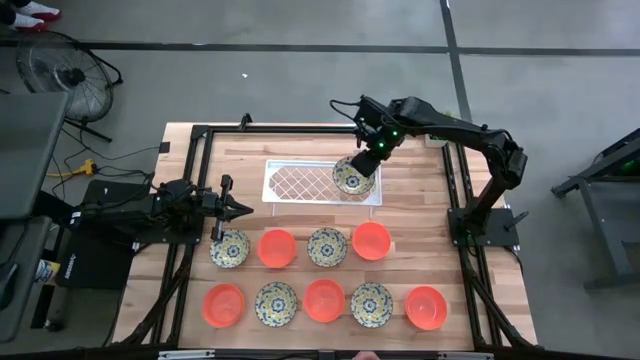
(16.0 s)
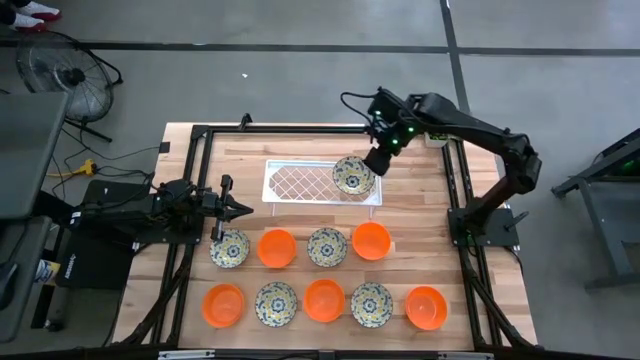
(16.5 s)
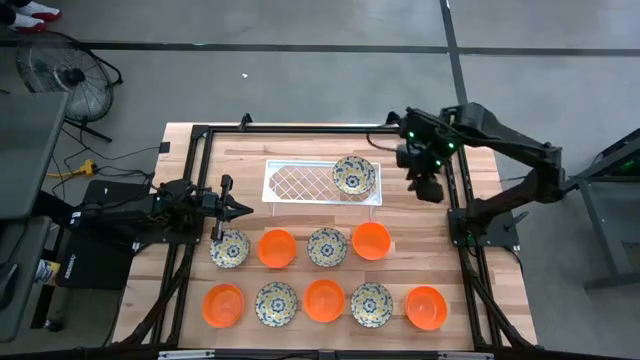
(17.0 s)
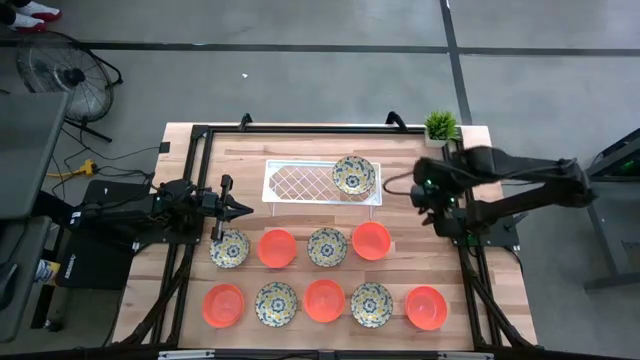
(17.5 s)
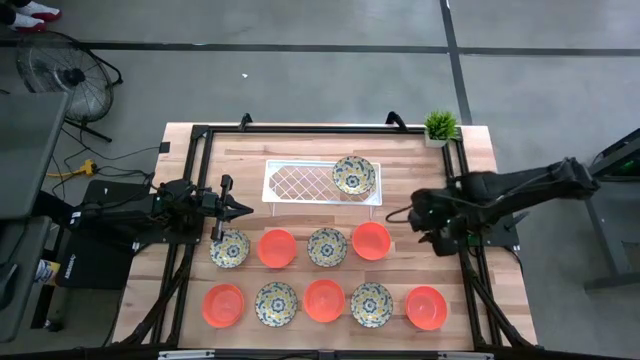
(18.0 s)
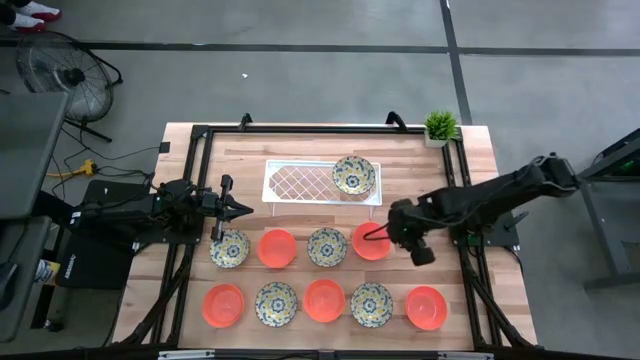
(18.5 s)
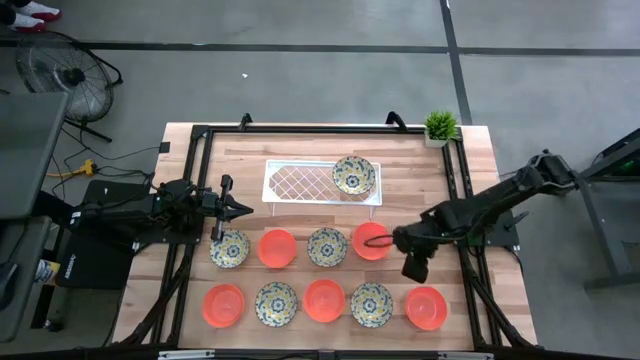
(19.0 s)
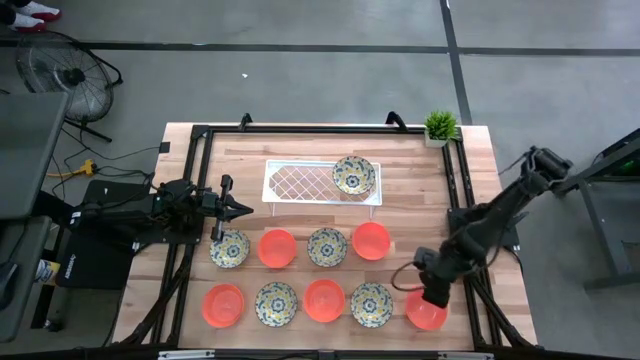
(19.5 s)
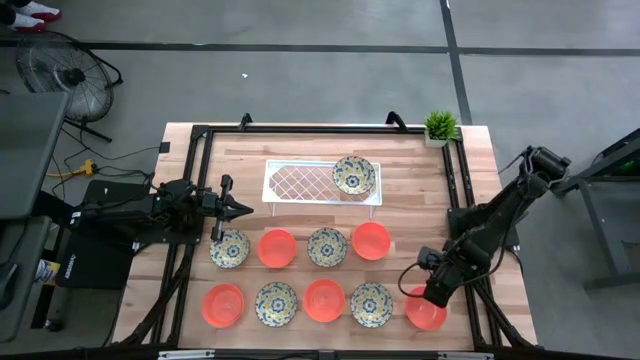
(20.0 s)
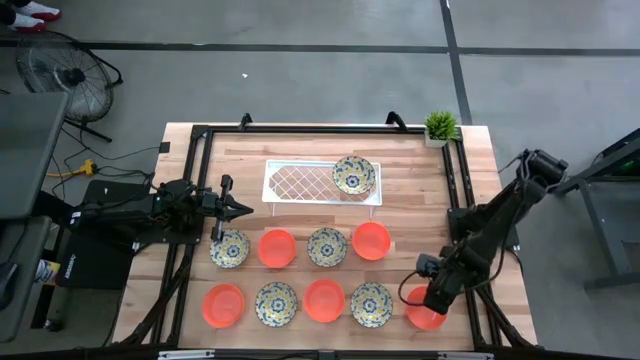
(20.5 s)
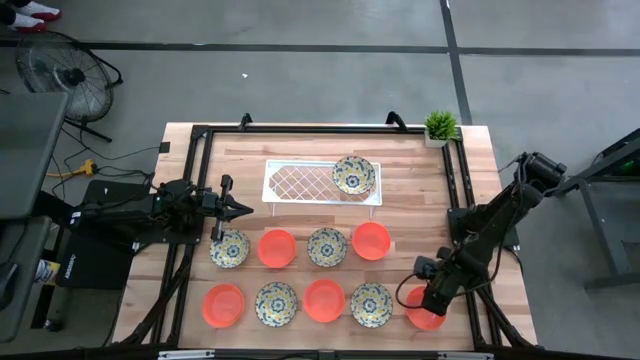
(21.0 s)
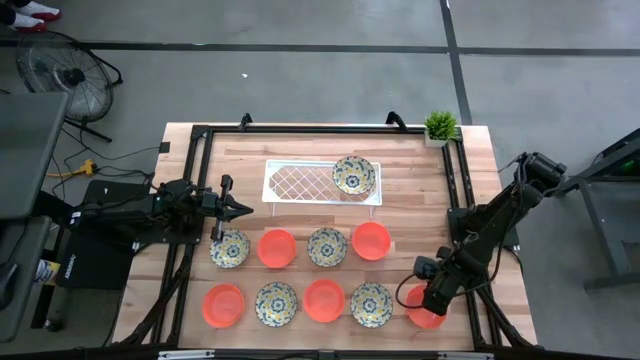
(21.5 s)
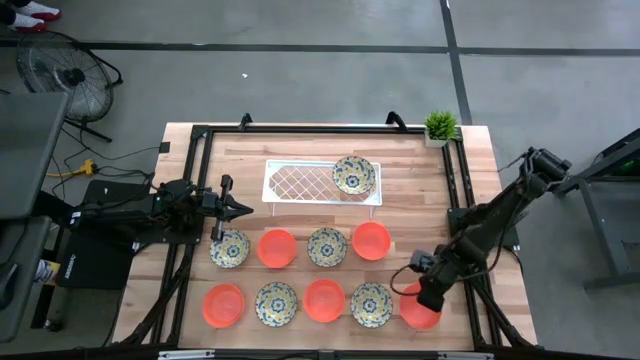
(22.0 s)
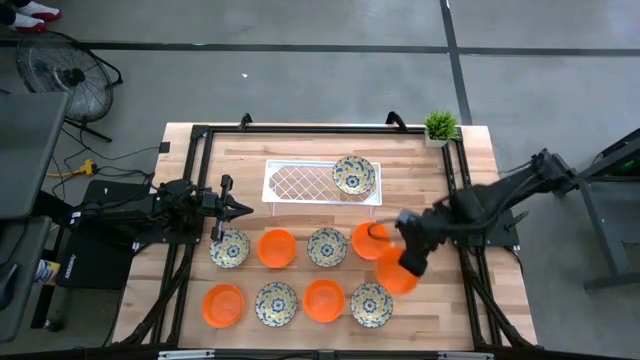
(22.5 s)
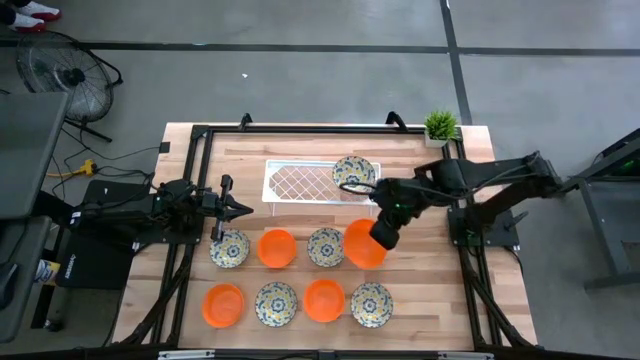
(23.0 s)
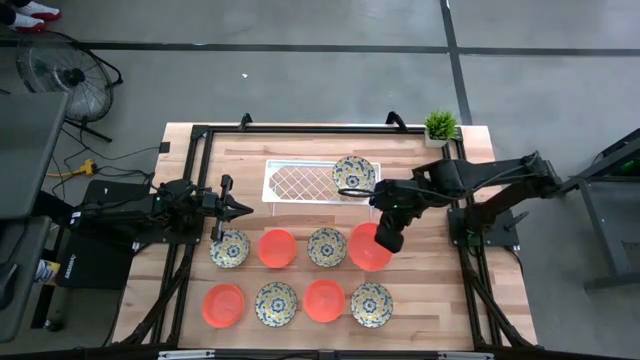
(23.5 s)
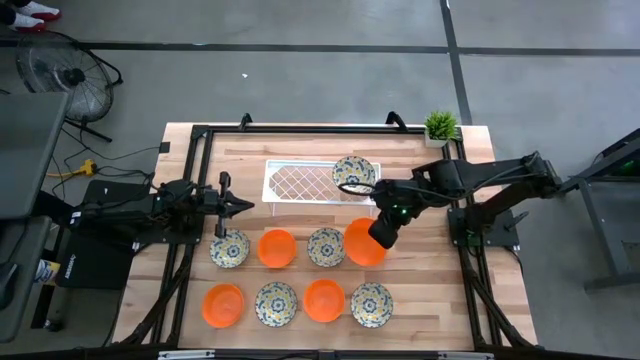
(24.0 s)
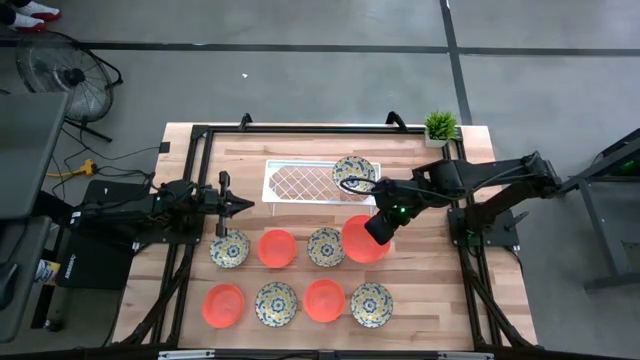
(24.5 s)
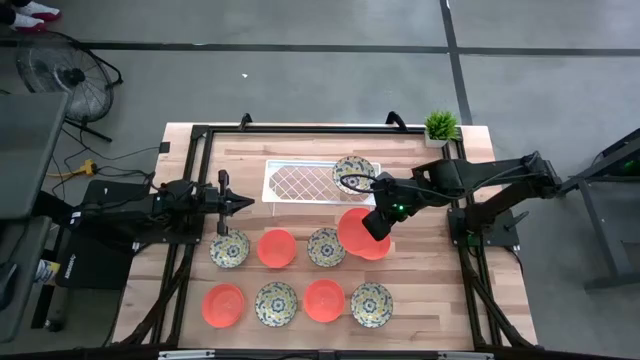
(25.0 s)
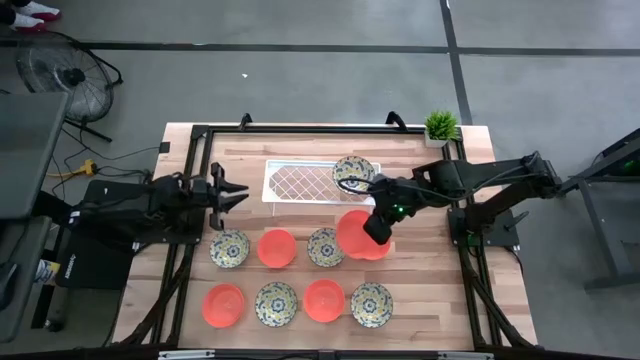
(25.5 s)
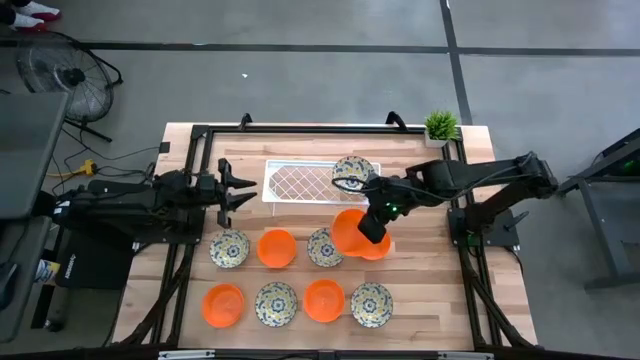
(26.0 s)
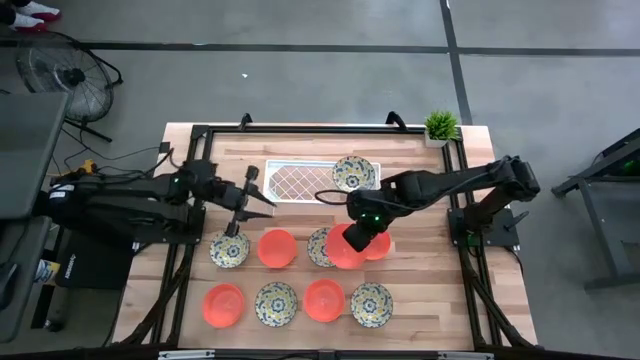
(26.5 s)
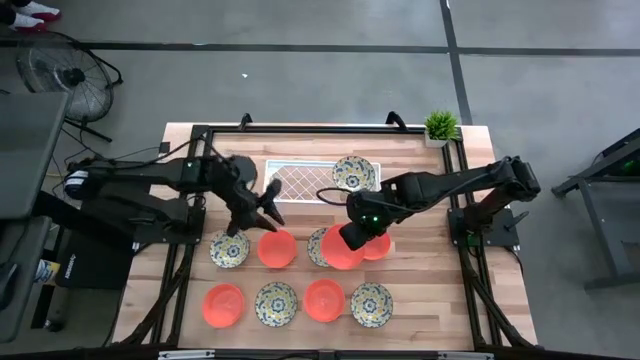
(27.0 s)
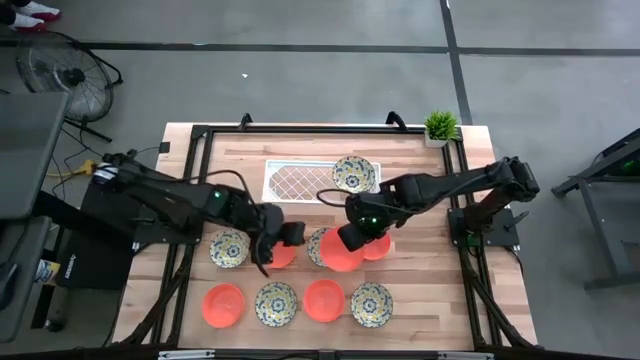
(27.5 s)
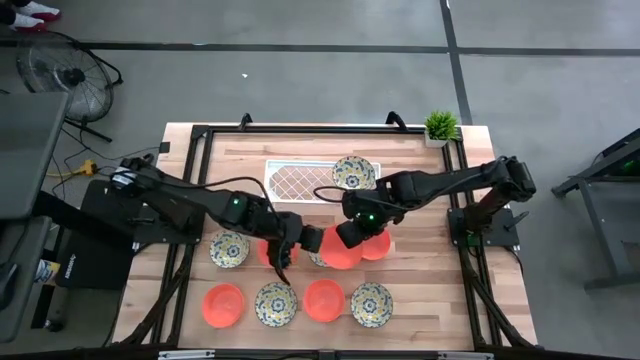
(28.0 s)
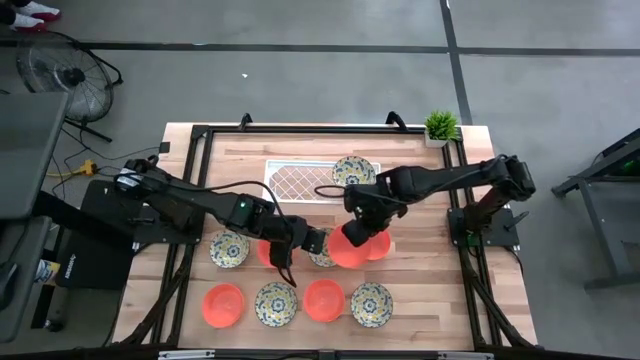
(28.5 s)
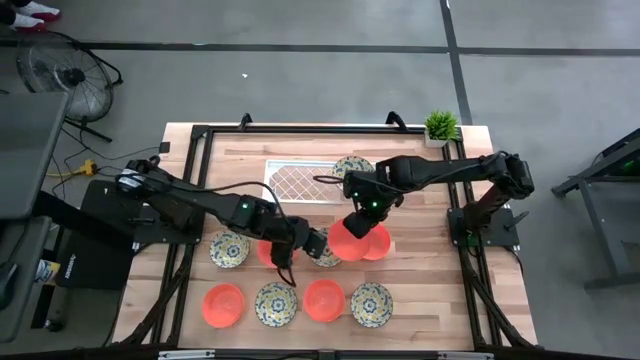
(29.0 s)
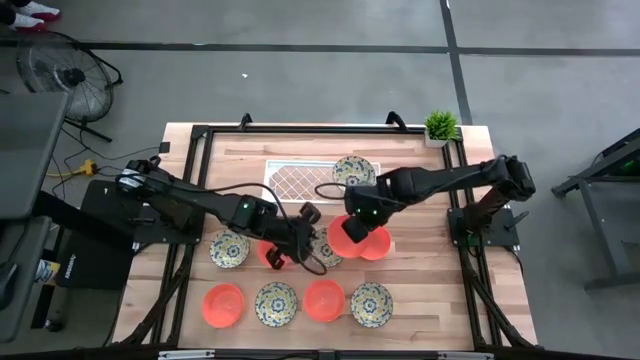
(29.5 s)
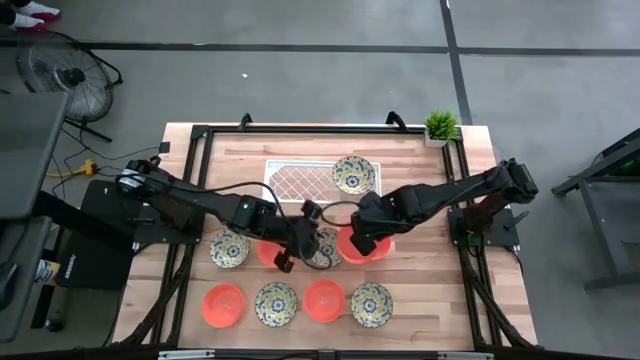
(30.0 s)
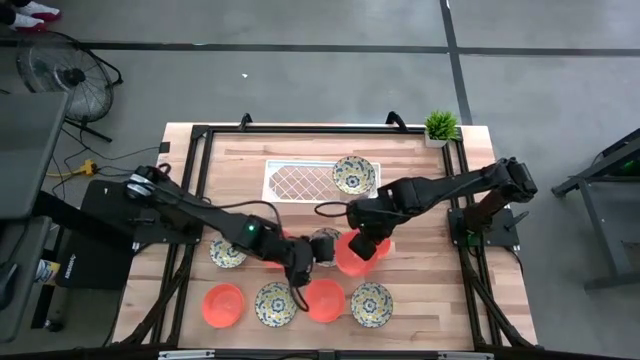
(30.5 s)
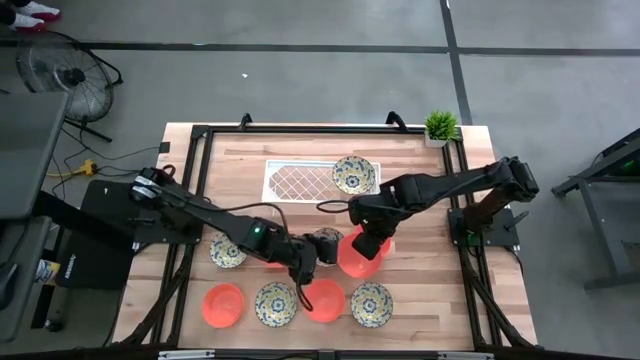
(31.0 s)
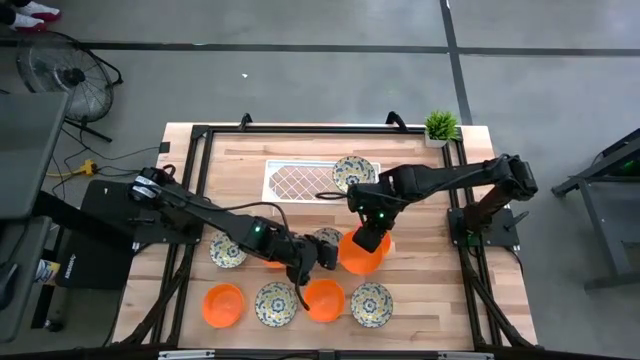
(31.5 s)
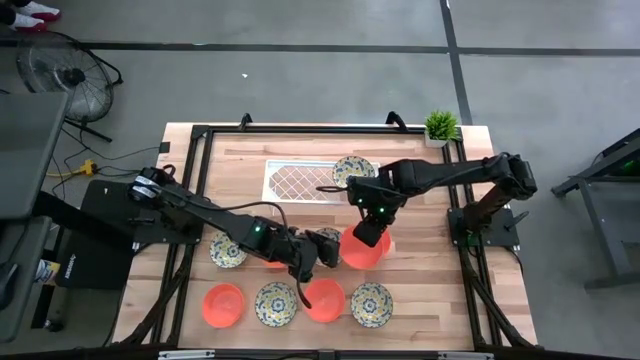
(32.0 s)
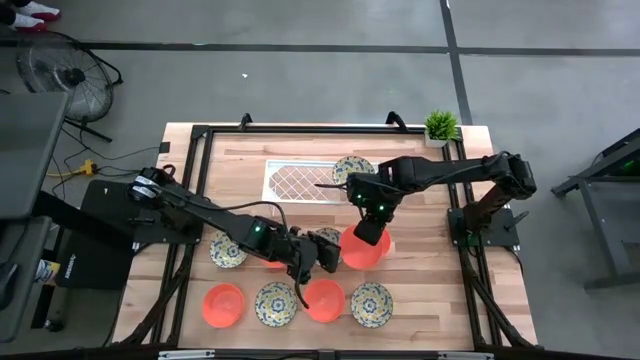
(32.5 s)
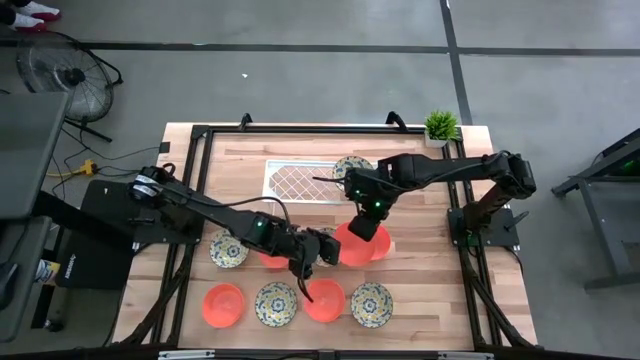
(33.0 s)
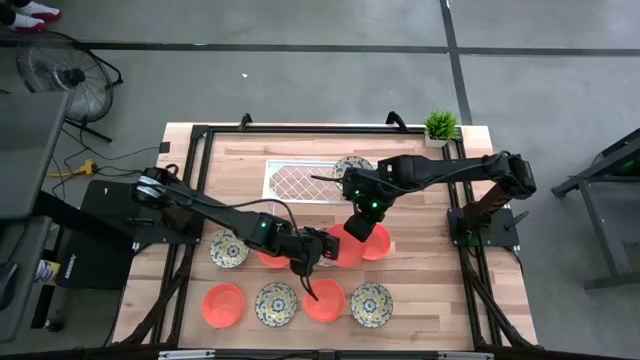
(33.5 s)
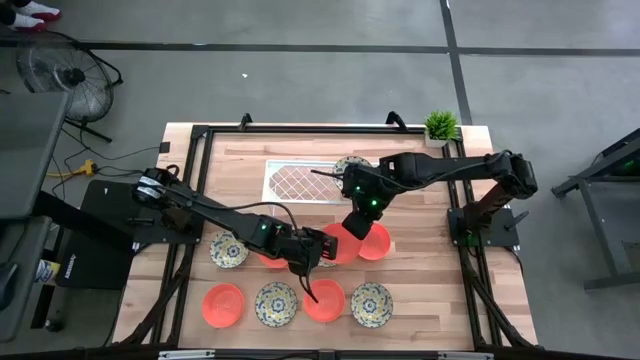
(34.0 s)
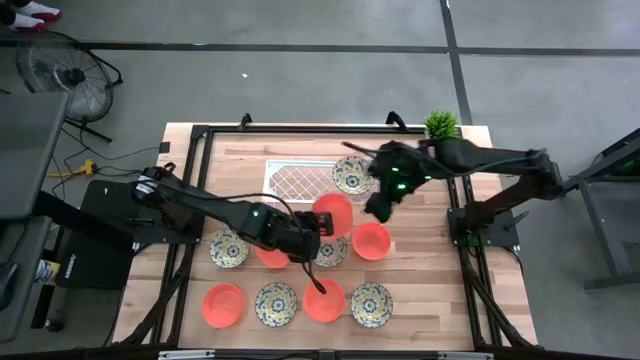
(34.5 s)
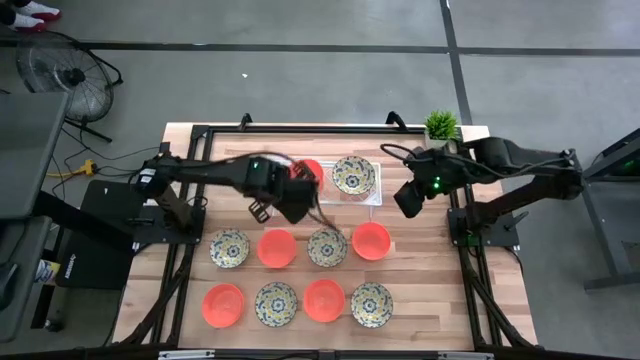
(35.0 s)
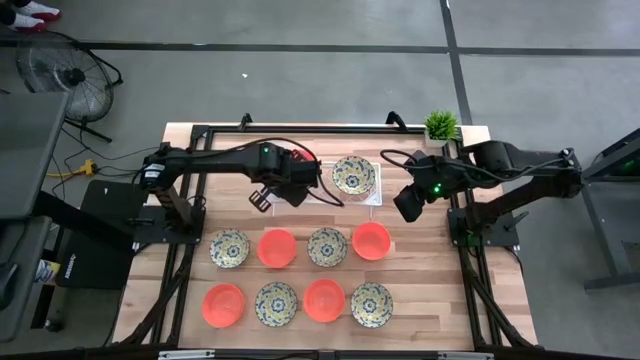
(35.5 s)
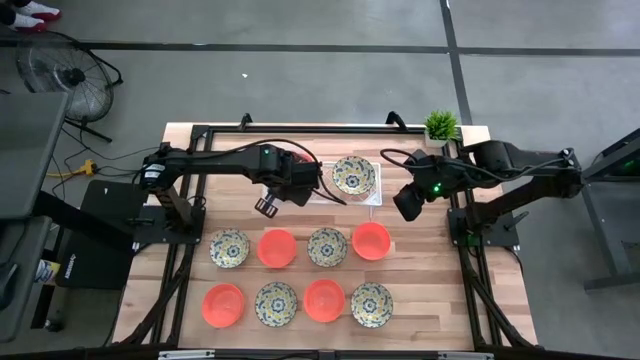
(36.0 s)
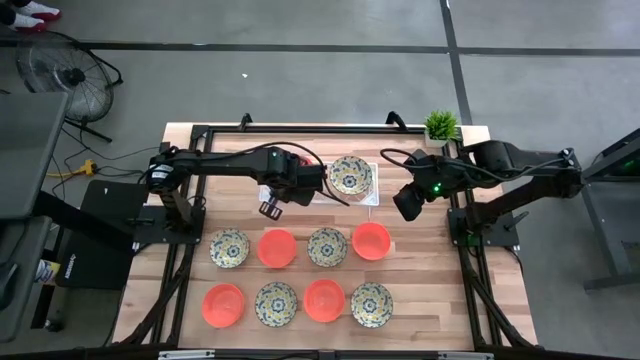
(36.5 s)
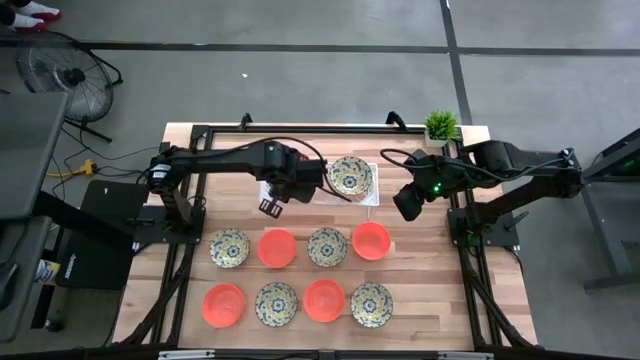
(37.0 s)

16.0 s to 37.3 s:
Task: Pick & Place Mini bowls
Put the orange bowl on the shelf

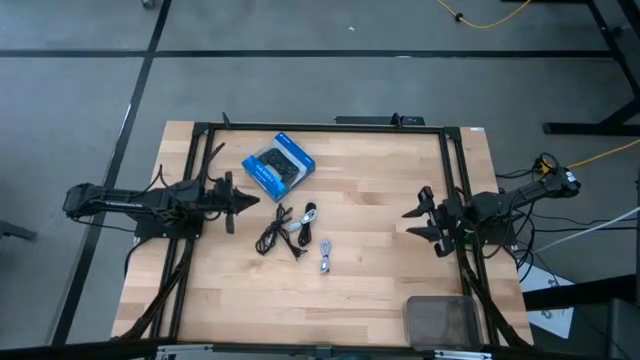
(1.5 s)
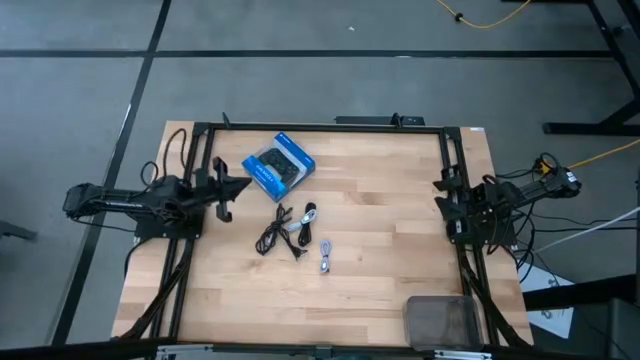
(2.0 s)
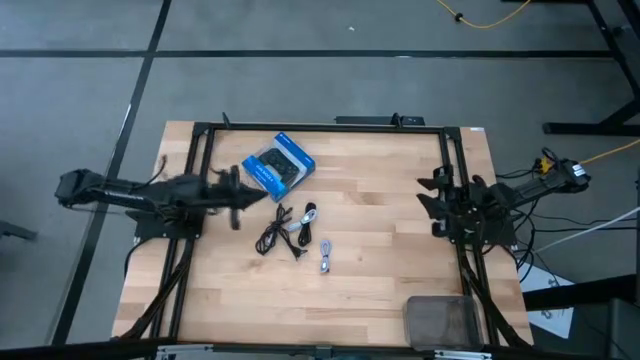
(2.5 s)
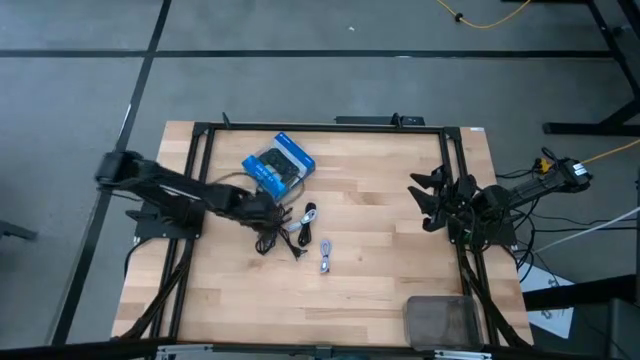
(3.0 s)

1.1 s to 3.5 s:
Task: Pick and place USB-C Cables
Prepare the charger cables
